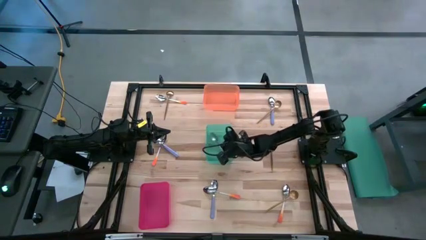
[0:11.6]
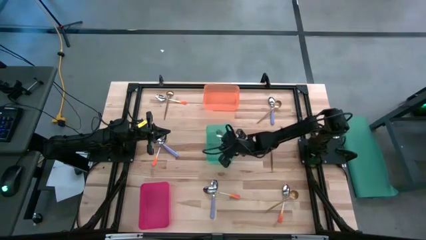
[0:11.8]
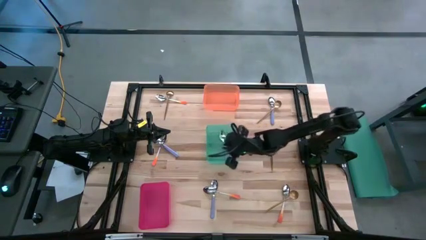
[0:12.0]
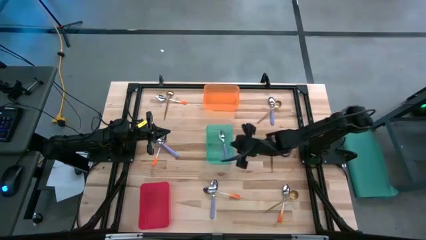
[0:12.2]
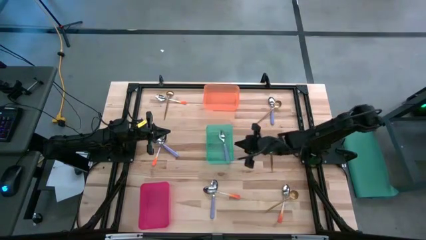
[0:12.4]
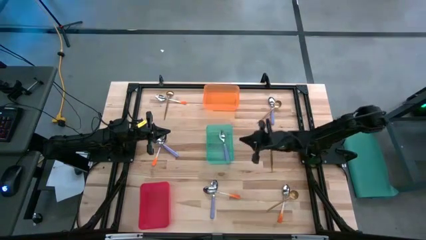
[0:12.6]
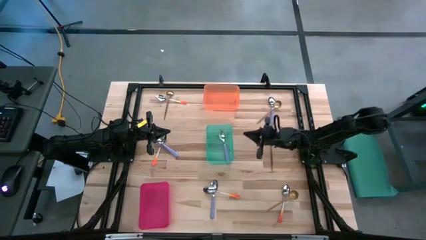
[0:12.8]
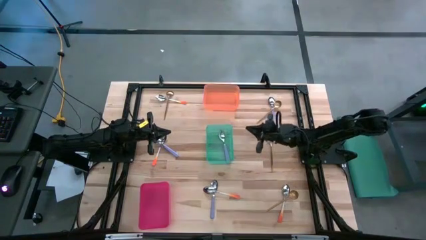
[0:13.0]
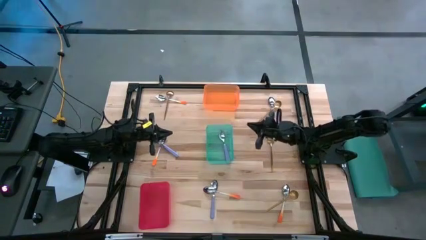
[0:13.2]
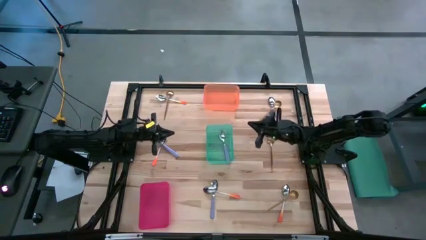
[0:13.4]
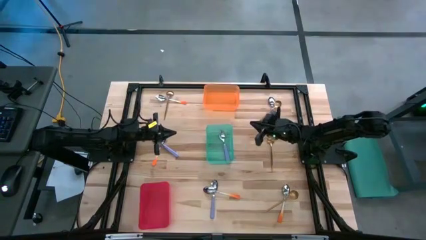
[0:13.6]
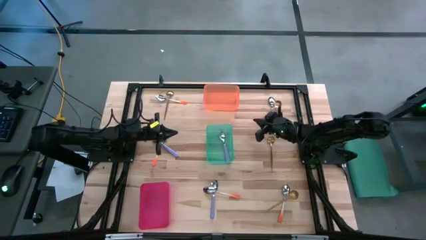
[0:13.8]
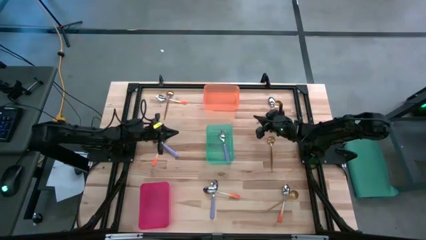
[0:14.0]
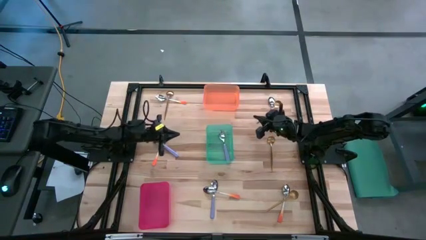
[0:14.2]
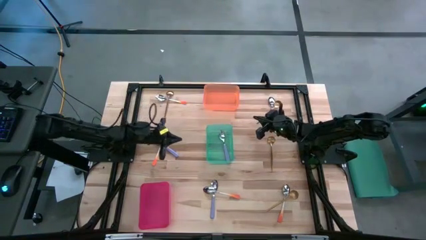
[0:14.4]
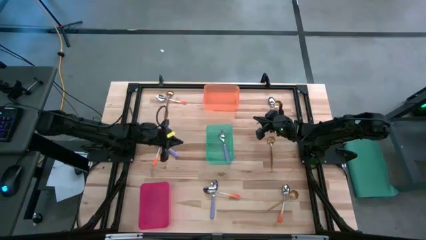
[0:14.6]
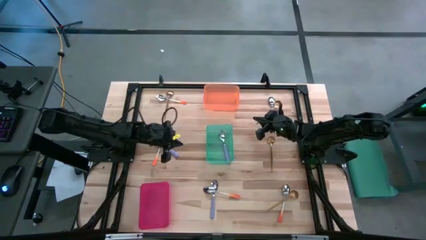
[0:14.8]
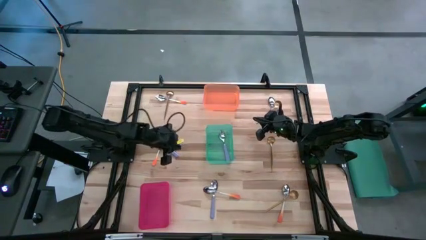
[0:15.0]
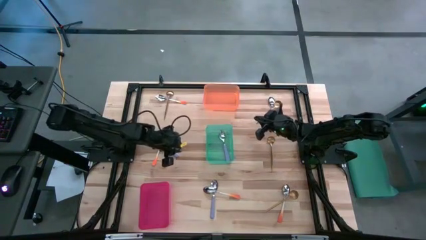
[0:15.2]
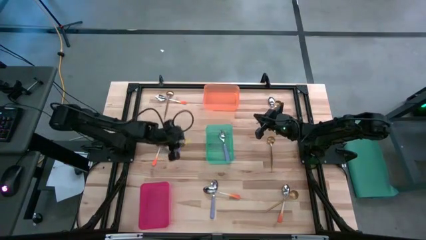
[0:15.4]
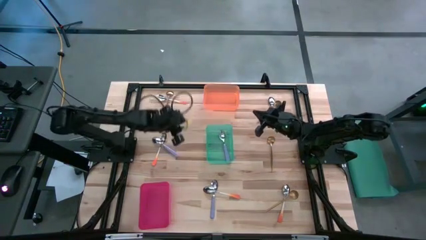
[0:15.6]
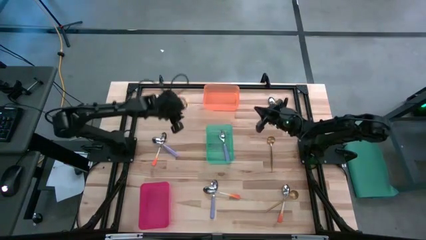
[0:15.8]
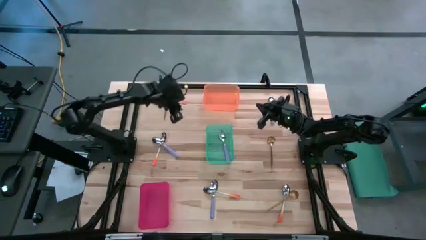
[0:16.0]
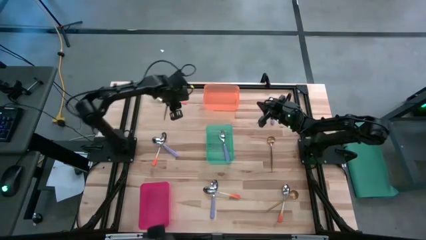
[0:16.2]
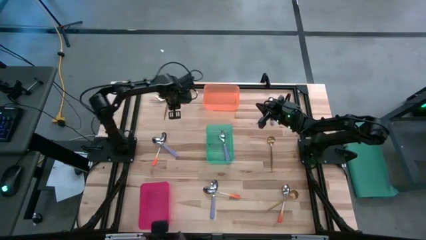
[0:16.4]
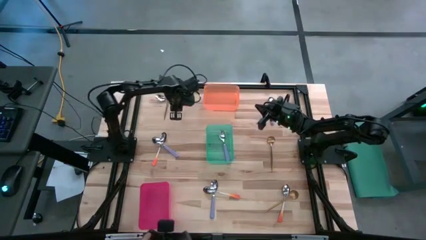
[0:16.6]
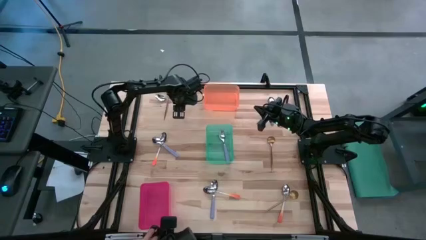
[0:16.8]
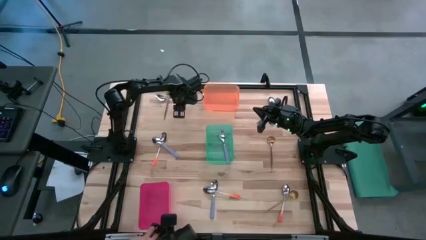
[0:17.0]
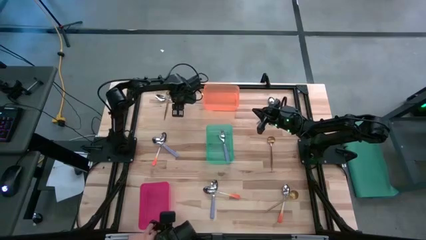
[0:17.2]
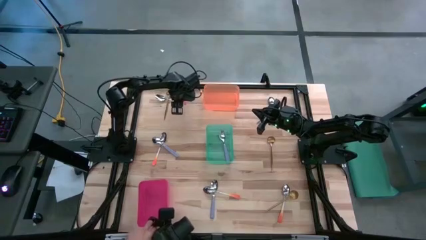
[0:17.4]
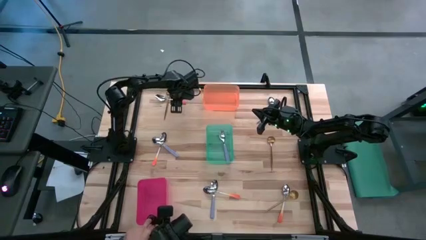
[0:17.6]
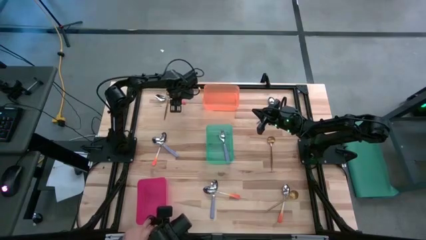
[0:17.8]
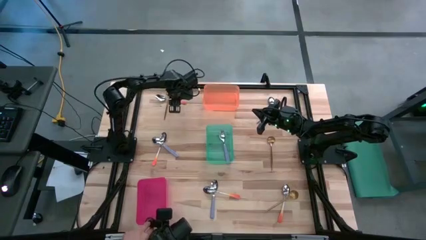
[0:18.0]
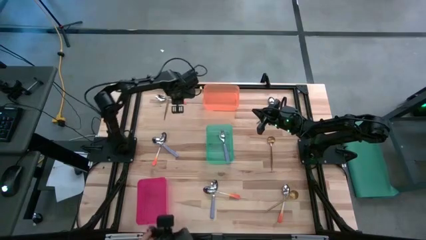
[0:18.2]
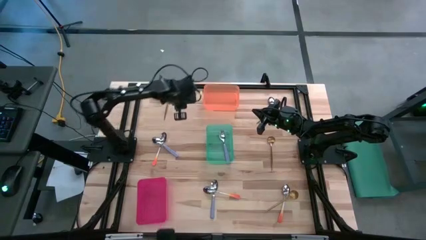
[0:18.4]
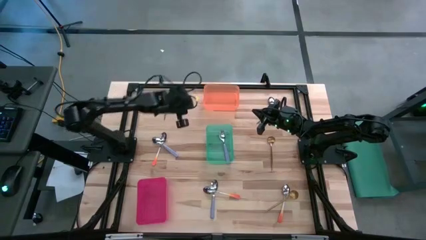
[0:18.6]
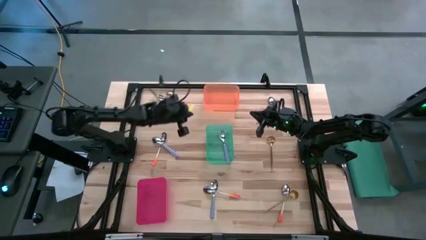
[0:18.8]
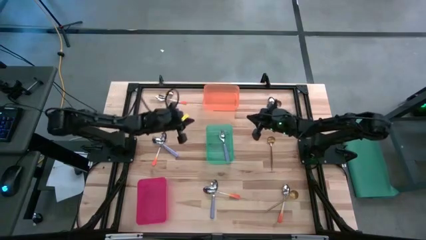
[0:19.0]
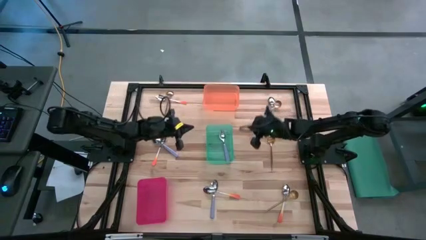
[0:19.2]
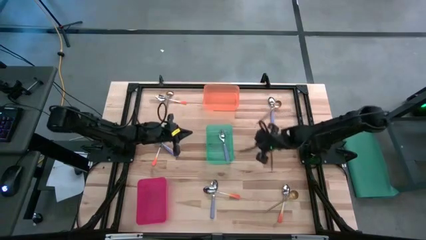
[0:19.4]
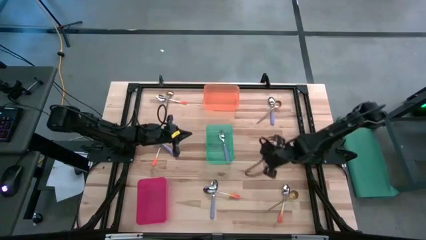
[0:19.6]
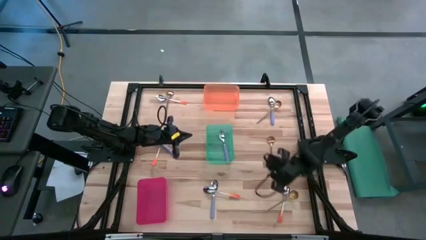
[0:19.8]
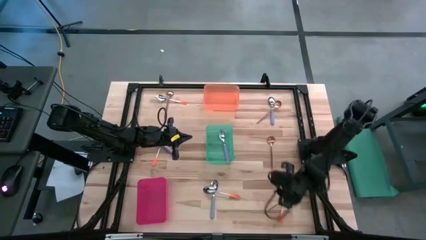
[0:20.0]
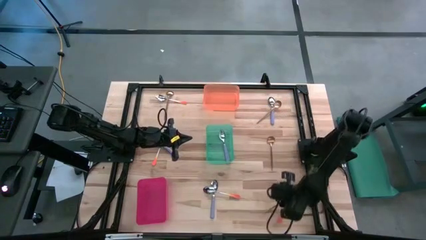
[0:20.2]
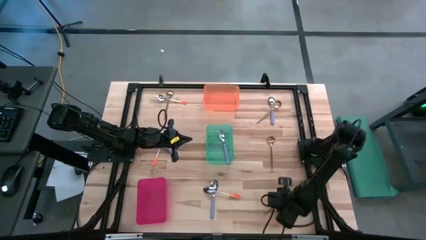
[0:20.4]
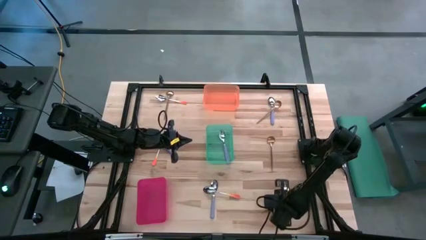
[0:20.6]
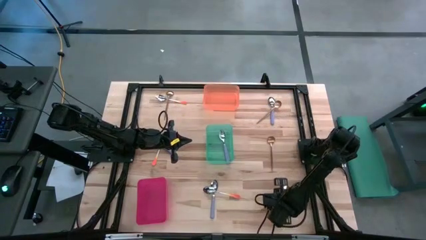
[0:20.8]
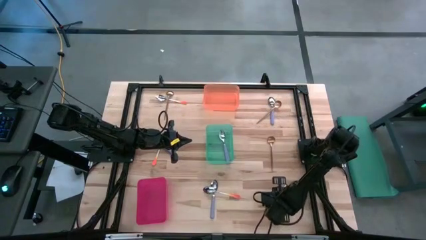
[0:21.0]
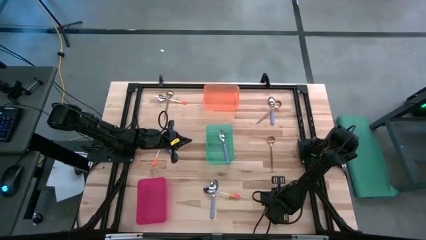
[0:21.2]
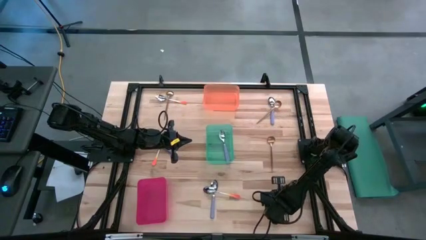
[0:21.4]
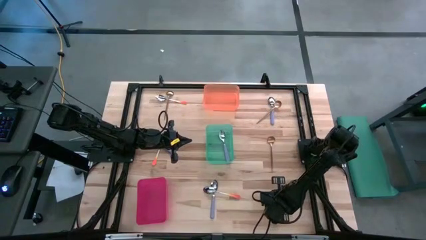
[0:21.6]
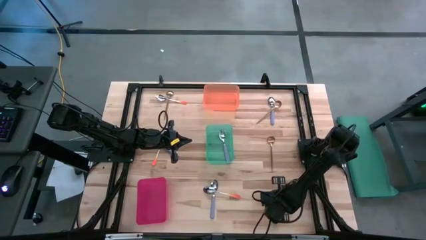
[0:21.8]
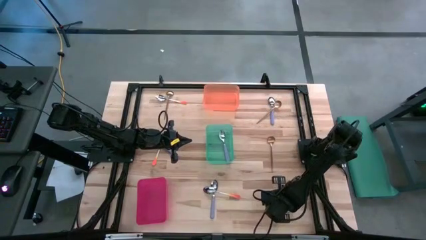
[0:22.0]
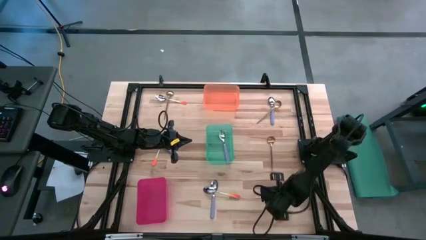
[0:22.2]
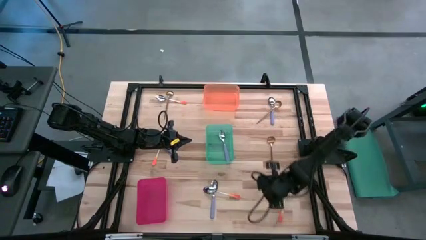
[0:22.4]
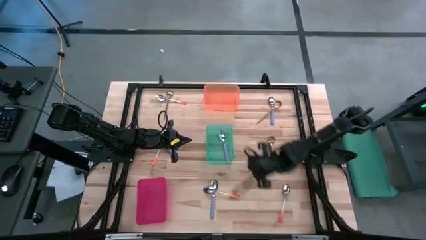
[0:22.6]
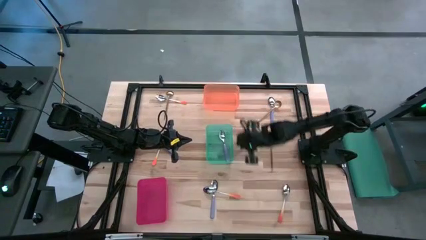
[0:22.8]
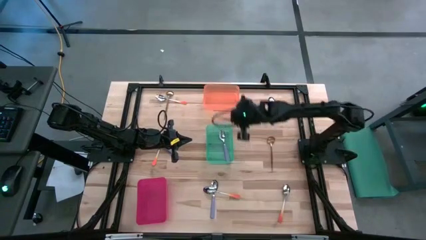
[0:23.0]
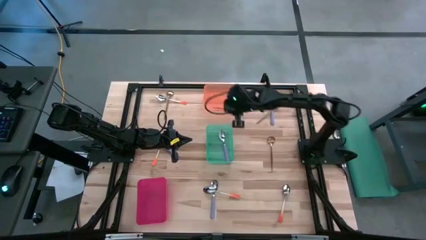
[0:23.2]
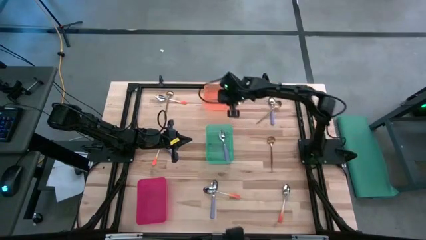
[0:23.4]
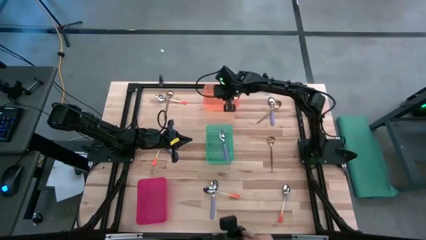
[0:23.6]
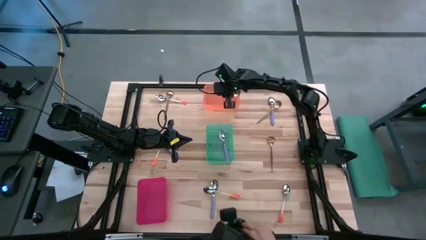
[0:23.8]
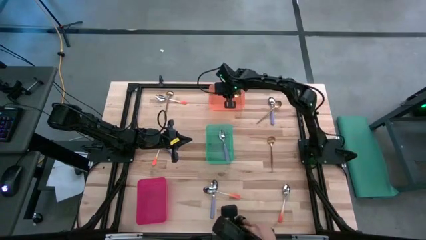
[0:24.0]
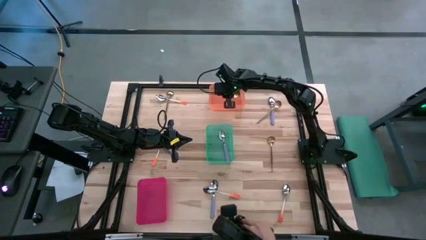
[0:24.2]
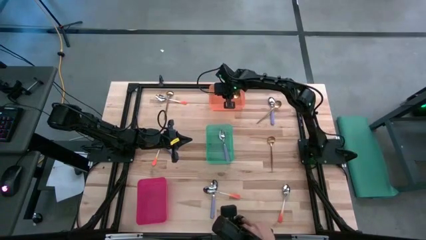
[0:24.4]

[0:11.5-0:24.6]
Task: Sort silverware by color (type)
Put the gold spoon into the orange bin

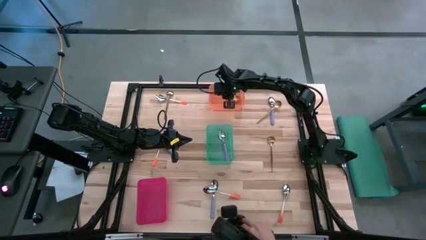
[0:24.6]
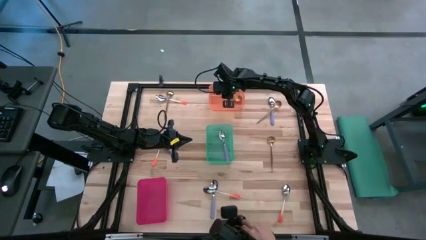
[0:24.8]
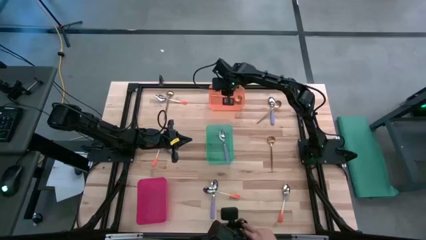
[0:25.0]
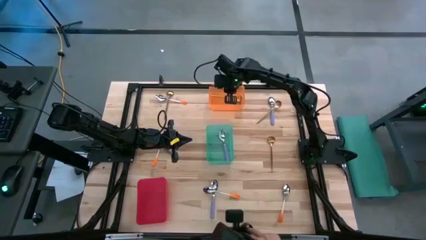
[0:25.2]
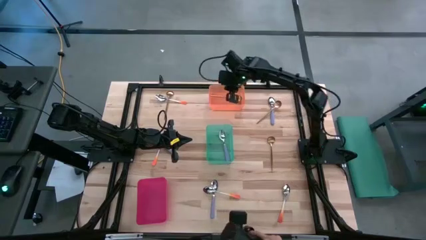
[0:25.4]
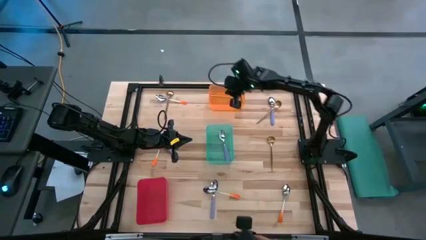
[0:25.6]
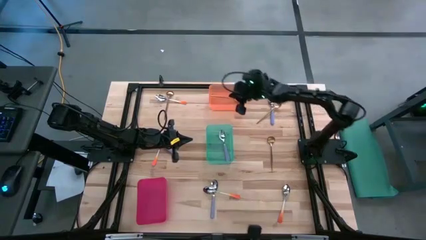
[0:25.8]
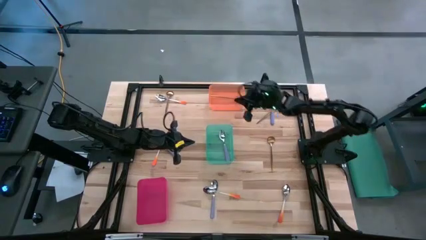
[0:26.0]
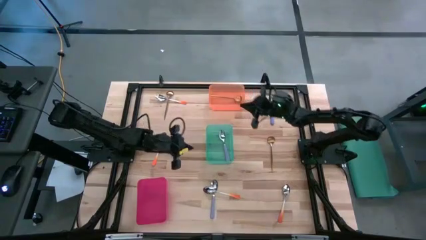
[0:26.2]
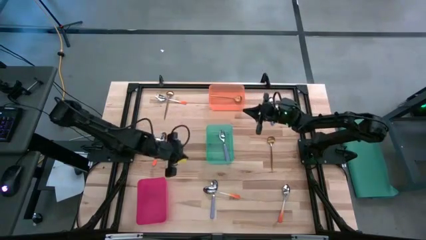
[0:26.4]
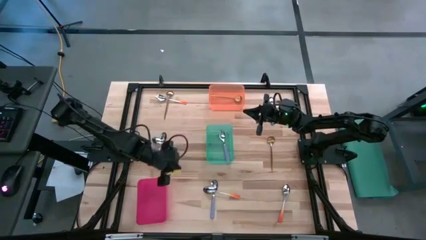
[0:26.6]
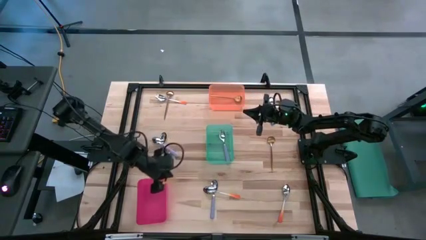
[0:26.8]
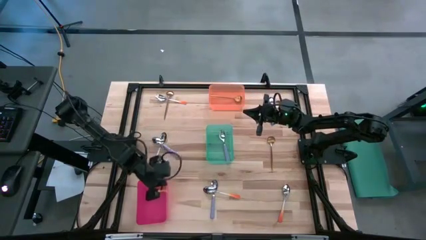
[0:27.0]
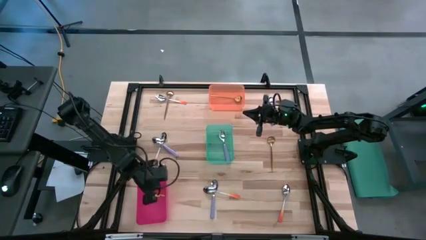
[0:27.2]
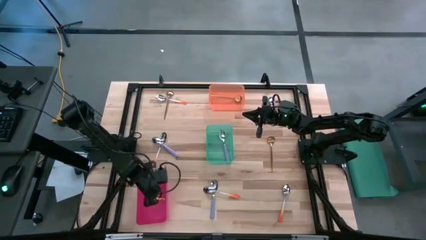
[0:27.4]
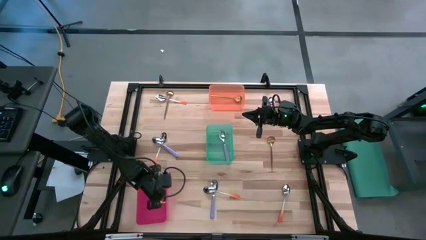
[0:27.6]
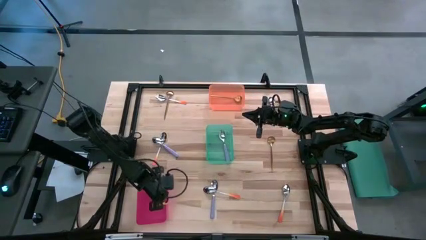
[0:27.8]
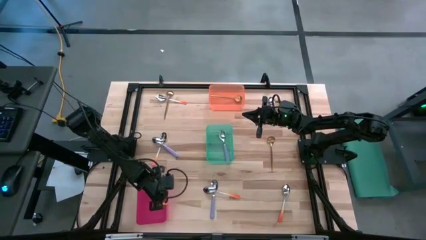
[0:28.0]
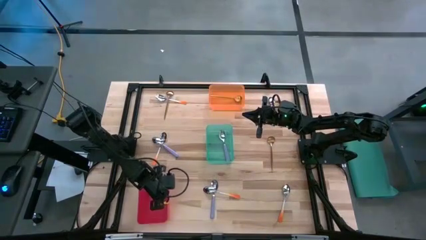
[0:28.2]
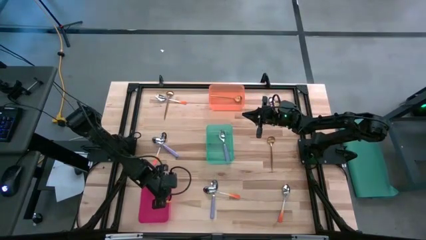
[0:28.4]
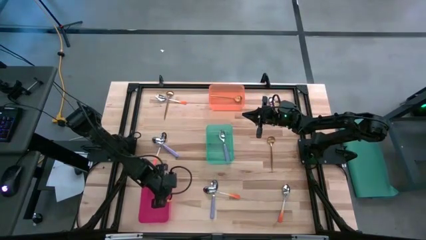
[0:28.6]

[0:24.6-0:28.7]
Adjust the red bin
